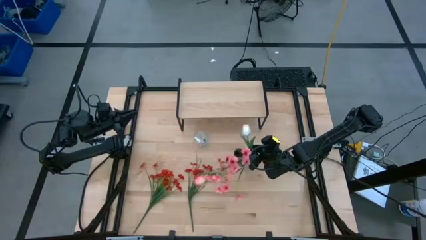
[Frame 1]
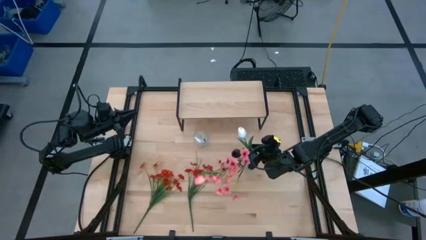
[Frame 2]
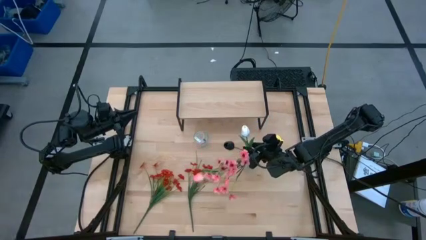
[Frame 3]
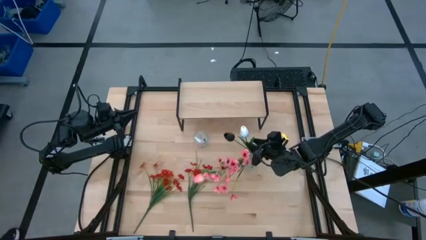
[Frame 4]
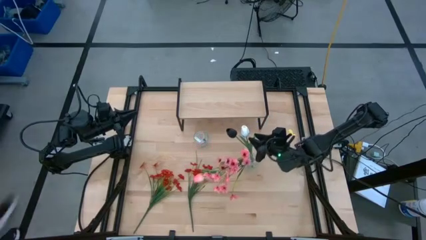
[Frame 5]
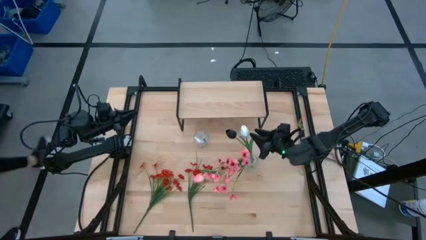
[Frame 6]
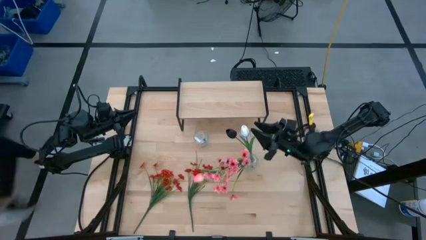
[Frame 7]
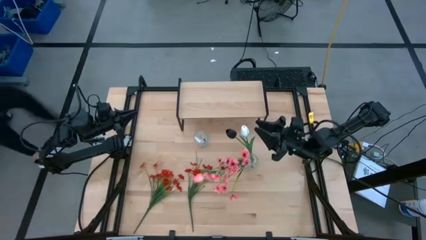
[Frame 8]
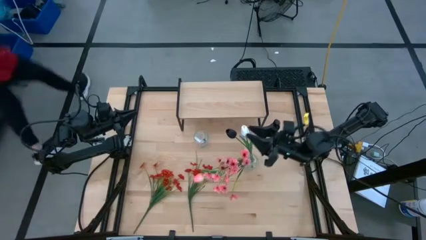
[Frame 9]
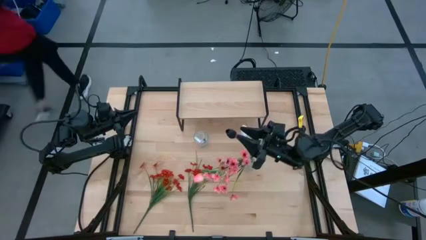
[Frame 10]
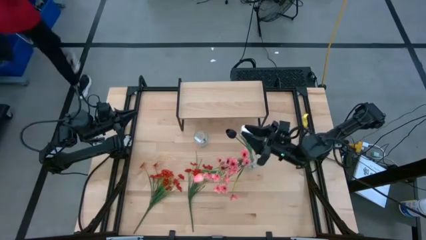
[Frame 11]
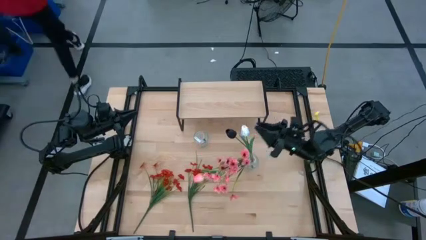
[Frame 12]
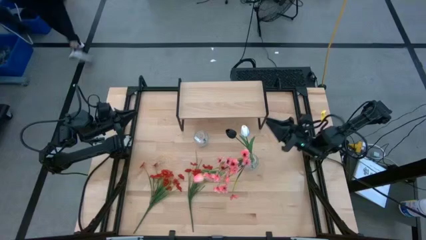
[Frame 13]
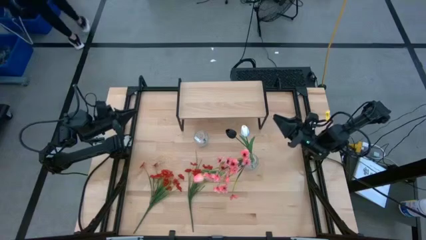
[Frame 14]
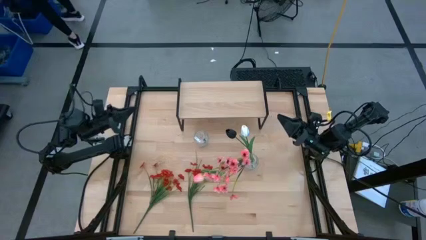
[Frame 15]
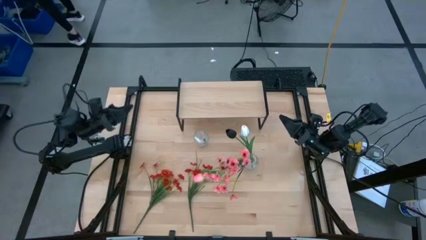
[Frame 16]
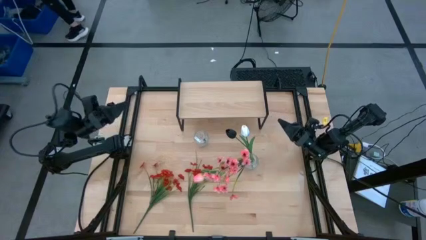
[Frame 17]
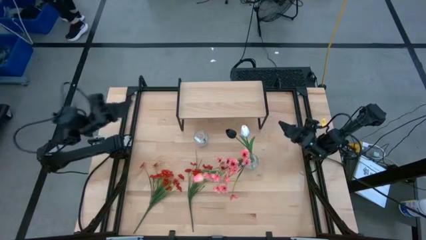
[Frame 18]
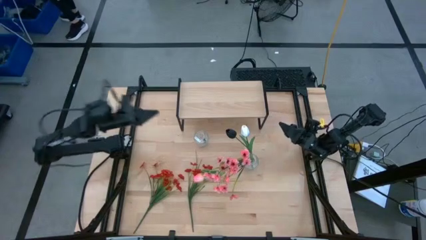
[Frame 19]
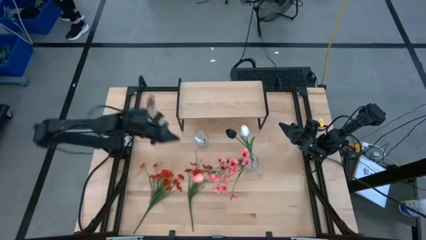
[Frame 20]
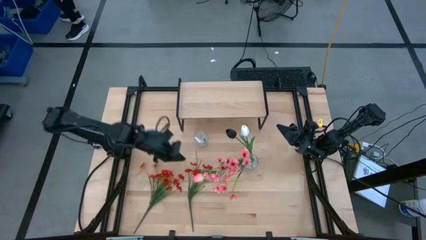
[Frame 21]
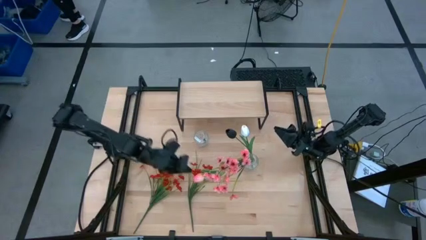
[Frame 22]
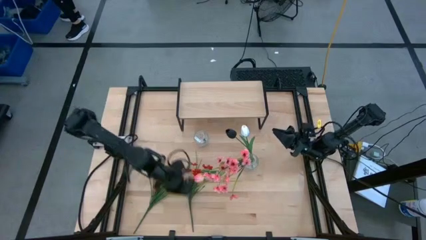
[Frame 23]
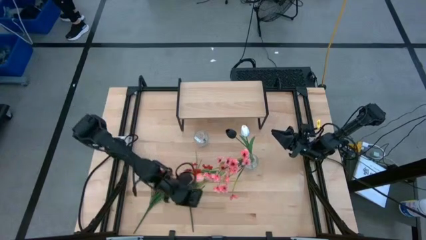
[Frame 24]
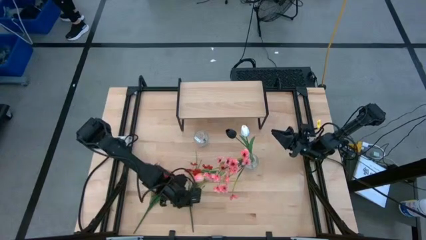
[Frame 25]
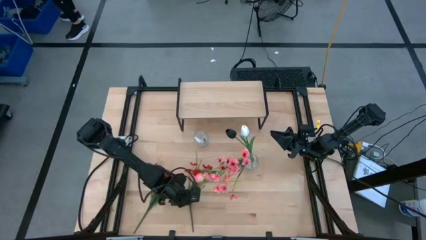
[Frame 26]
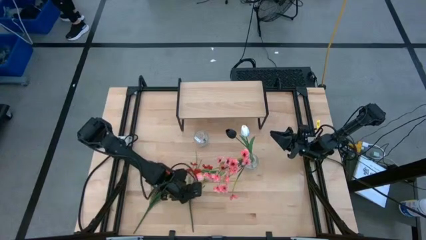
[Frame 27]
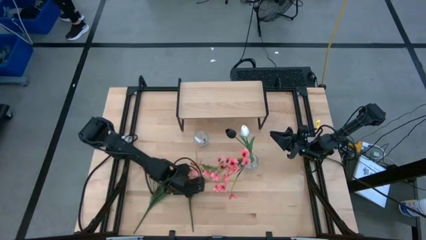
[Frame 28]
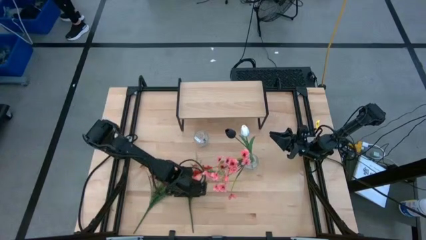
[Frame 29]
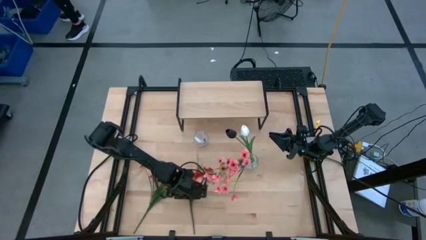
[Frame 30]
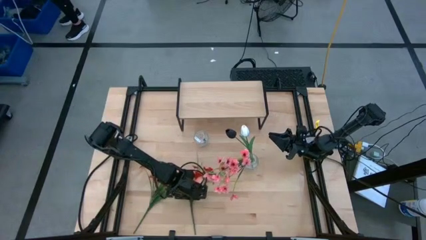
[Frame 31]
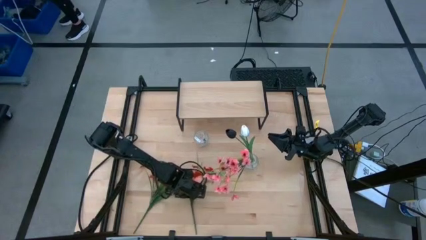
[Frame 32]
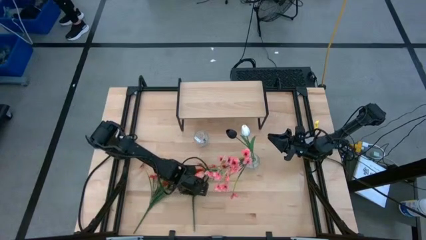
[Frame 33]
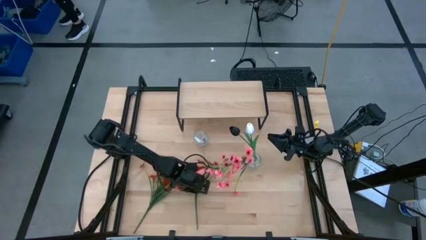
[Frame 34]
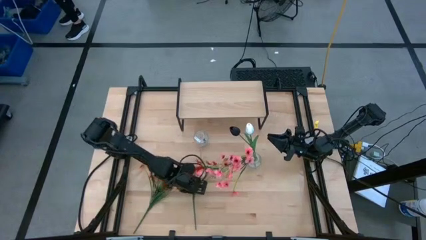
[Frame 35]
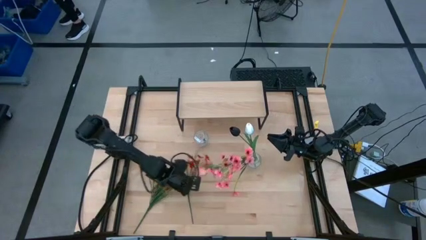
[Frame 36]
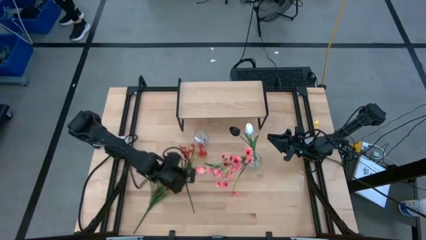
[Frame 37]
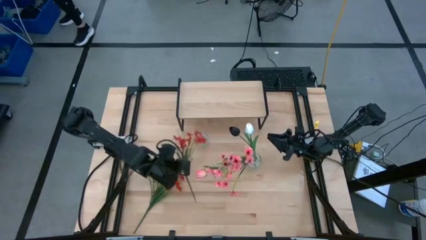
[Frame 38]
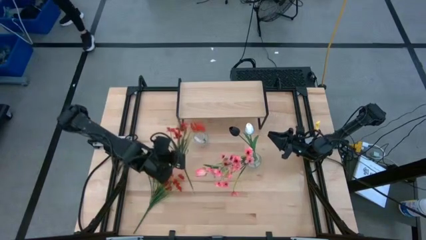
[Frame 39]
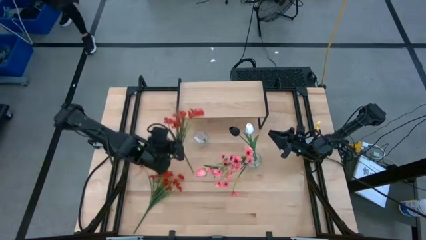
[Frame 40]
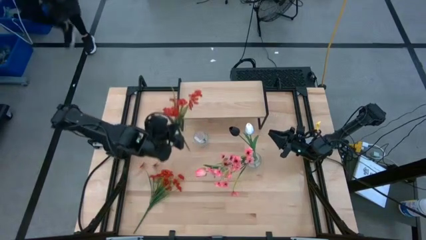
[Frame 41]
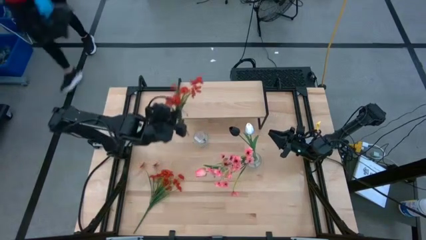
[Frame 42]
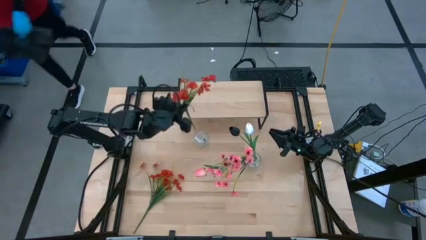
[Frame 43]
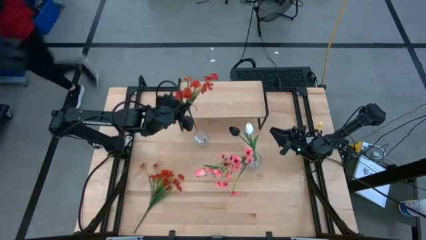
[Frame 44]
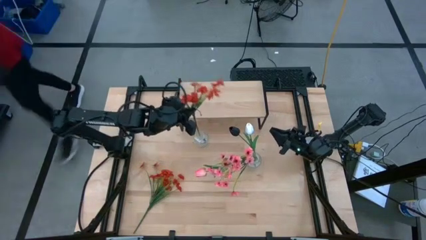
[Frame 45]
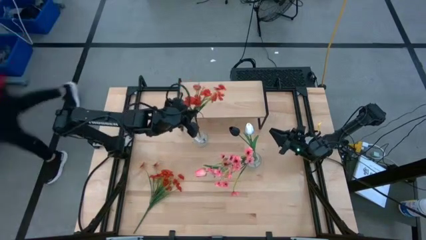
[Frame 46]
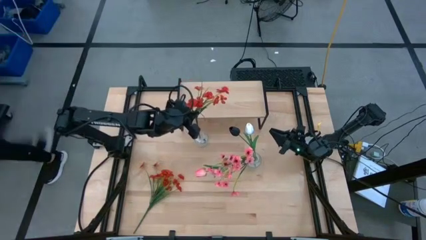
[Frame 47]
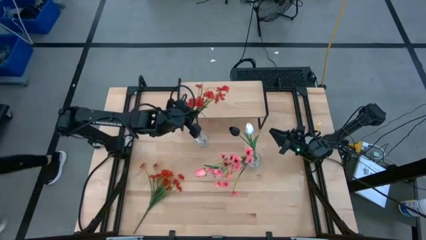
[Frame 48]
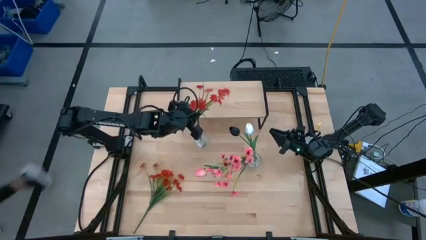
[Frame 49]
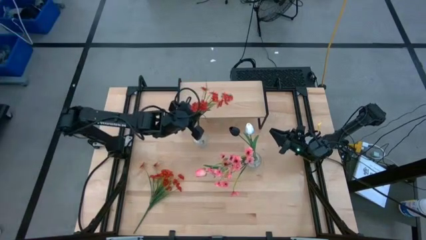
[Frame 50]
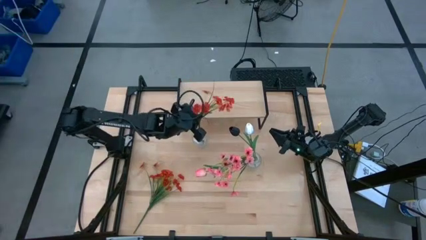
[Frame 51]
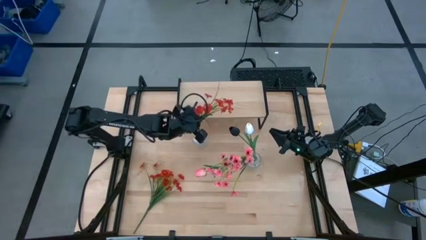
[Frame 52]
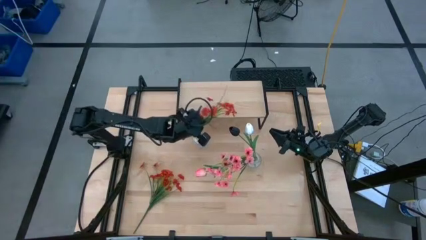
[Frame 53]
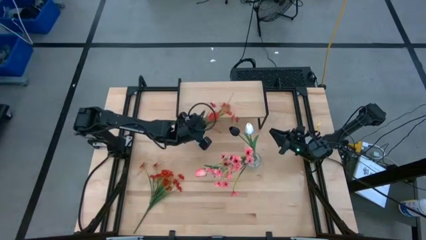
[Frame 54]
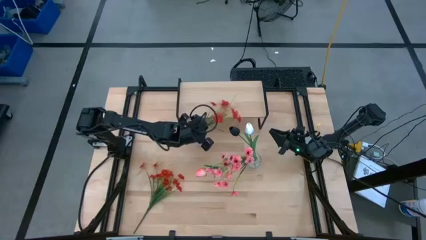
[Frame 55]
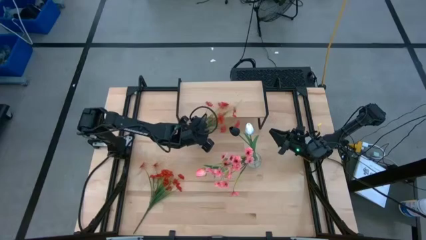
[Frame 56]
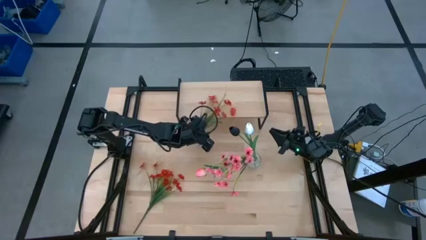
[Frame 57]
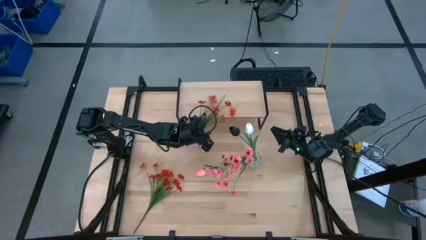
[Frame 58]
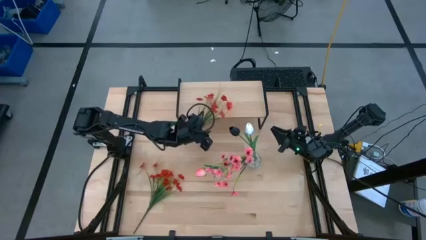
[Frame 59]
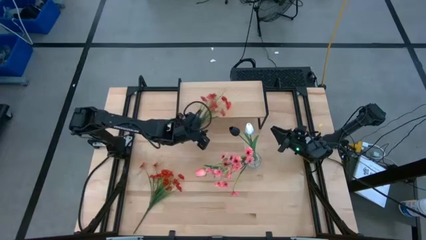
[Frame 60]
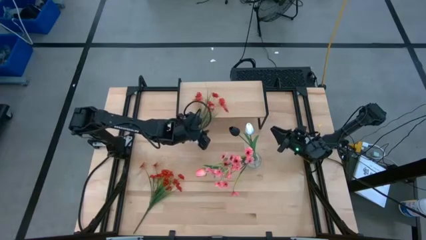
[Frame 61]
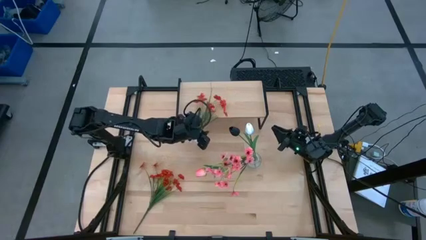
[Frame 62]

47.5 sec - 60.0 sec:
Task: Pick and place flowers into a vace then onto a shelf
Put the right orange flowers into the left transparent vase
